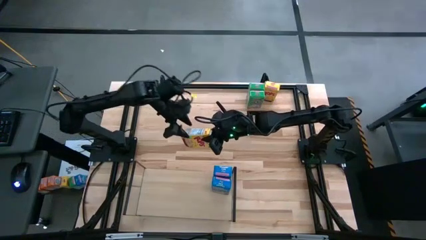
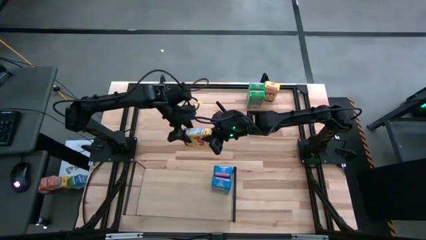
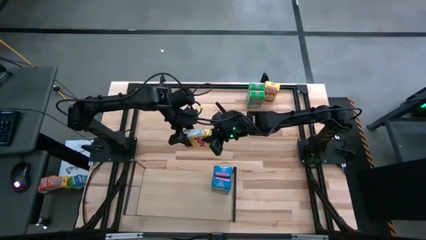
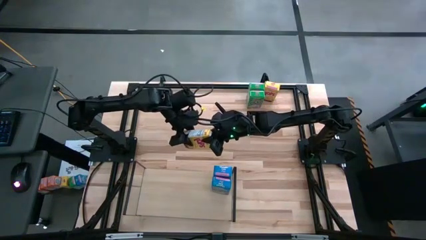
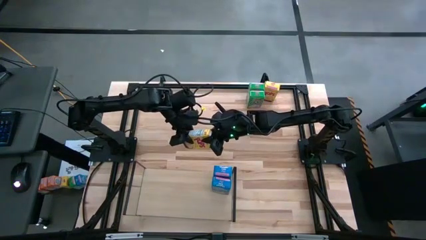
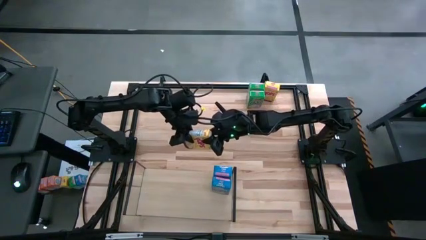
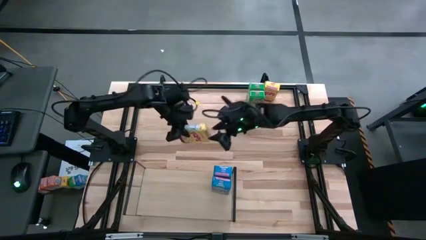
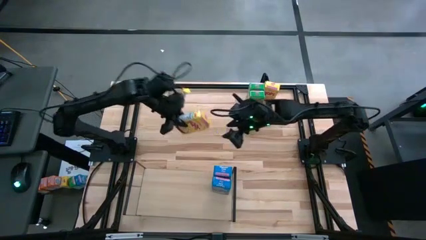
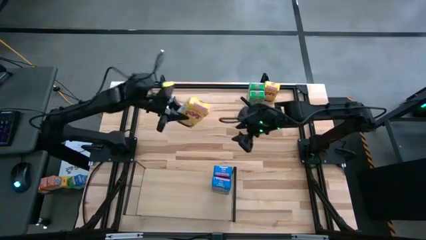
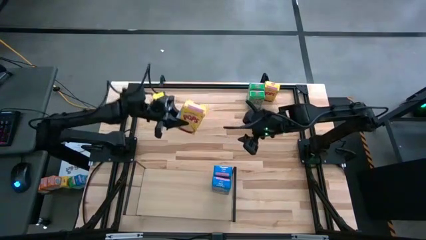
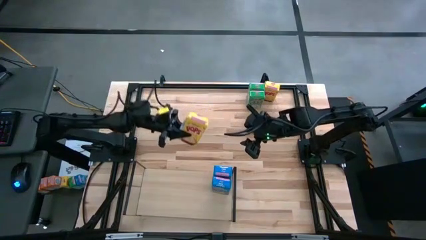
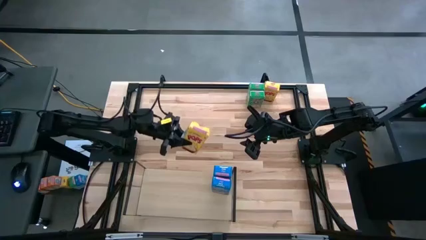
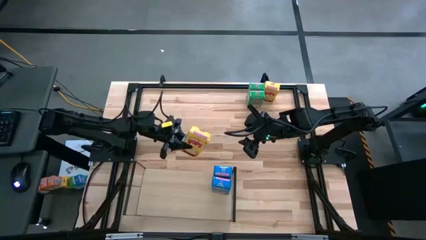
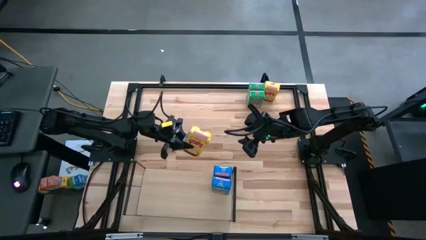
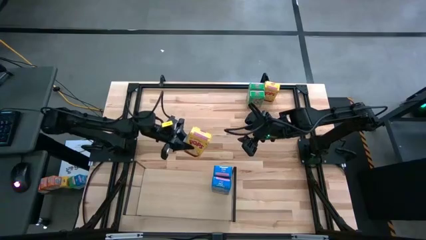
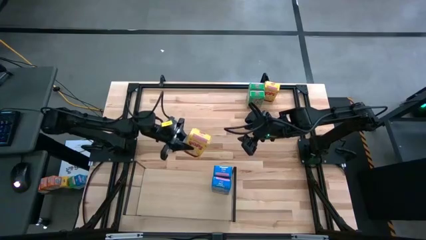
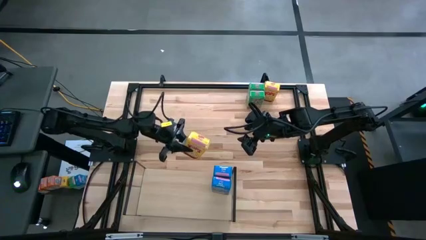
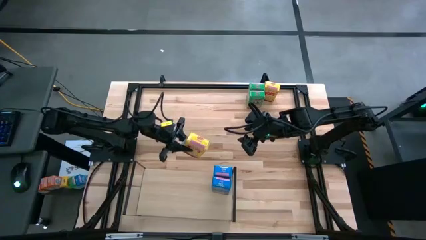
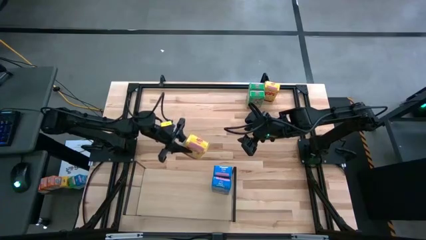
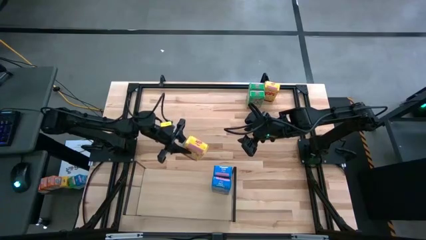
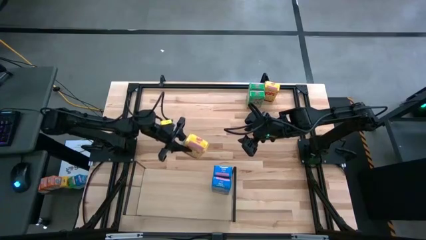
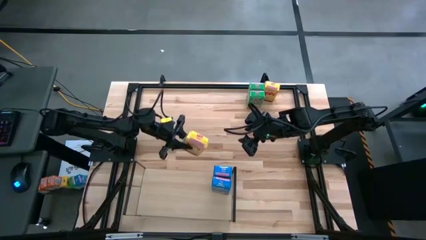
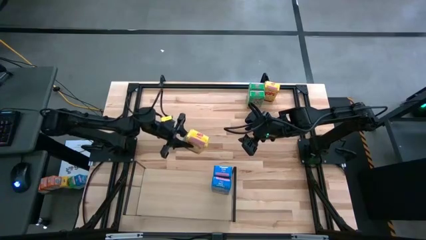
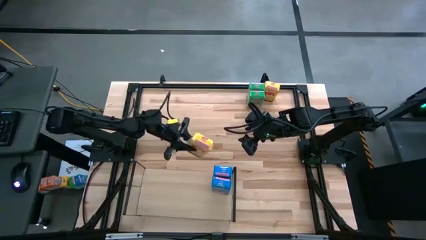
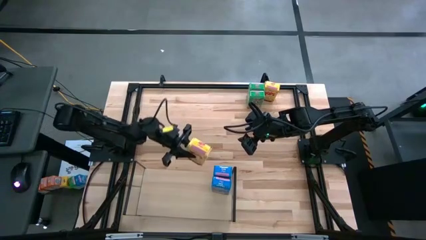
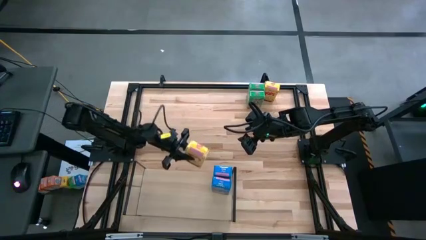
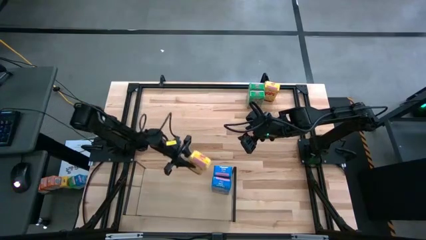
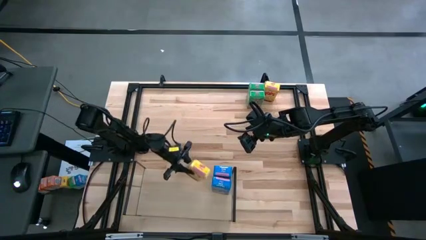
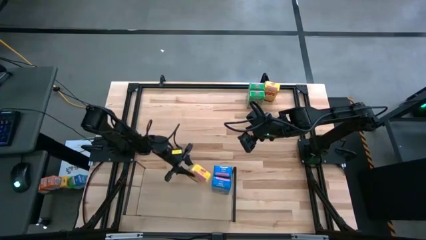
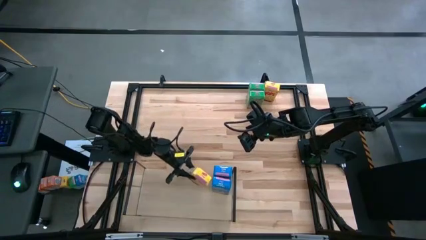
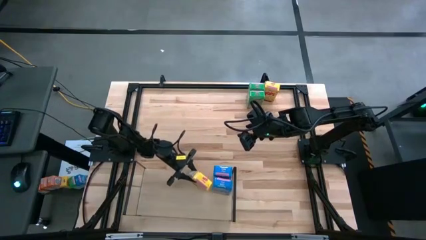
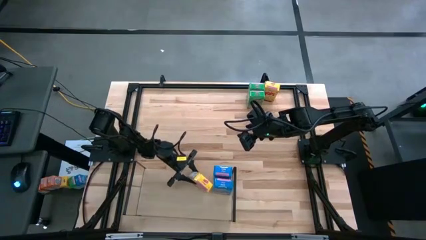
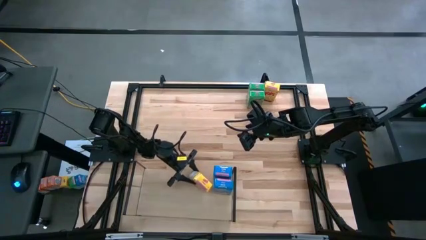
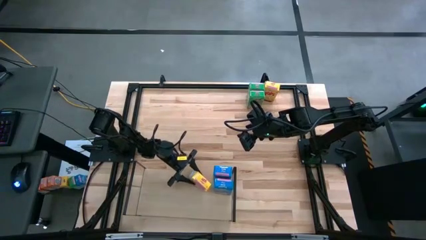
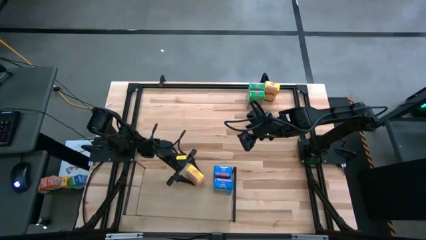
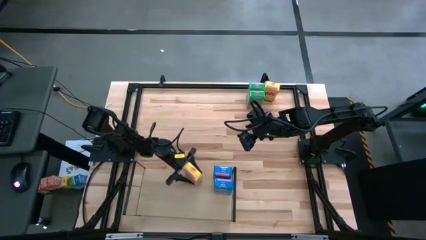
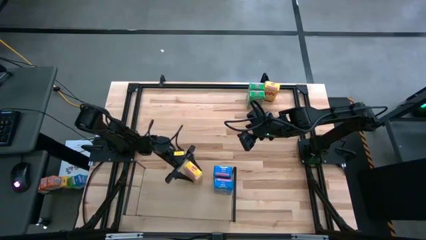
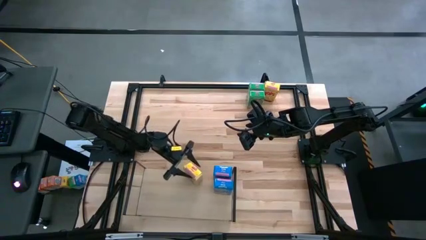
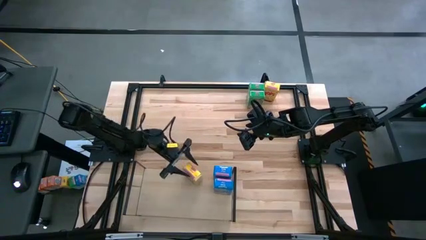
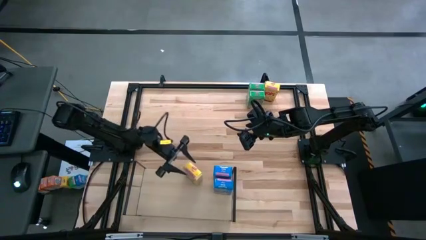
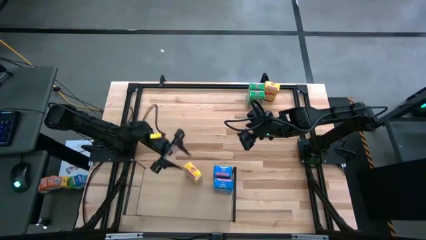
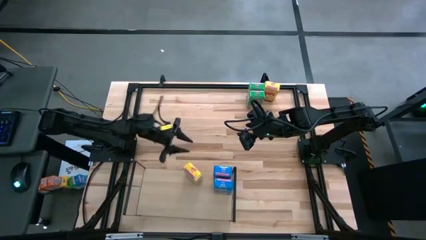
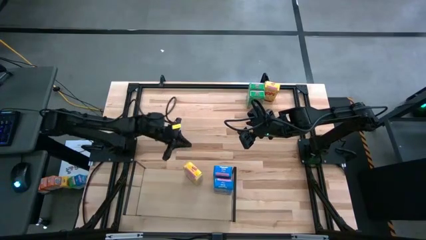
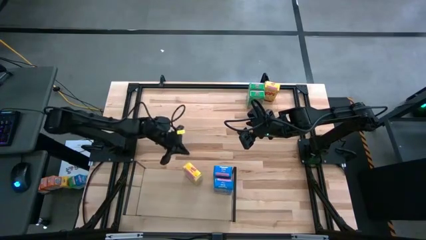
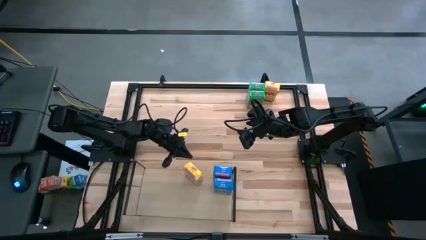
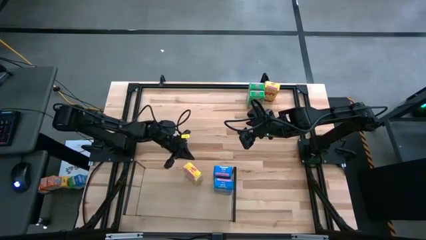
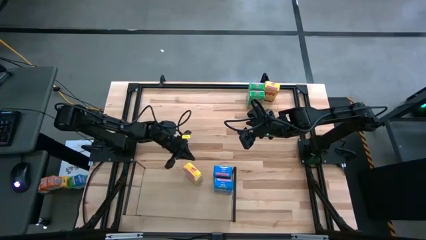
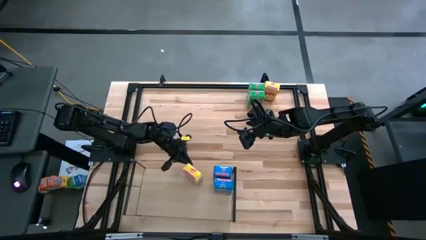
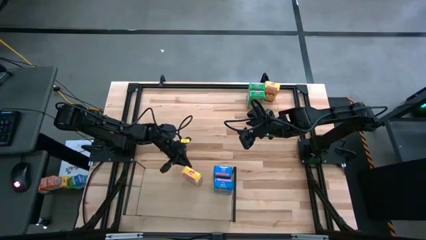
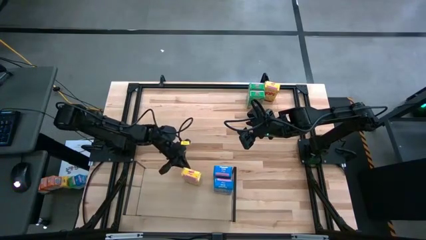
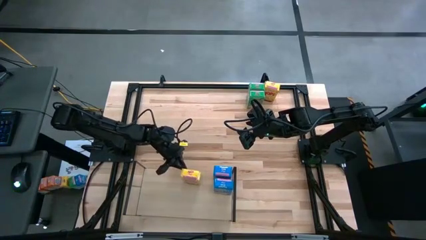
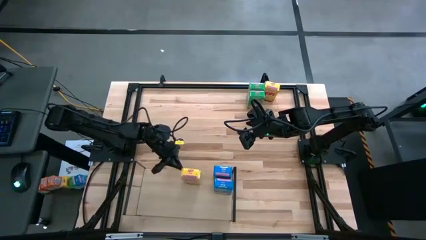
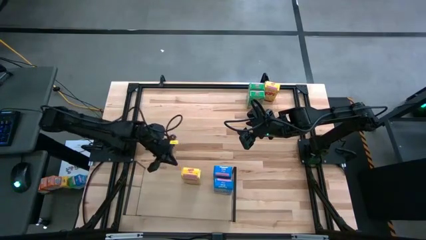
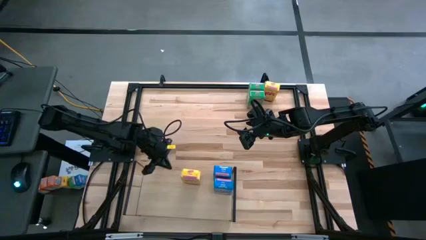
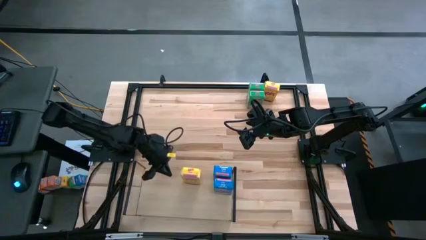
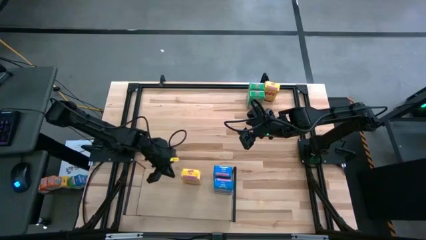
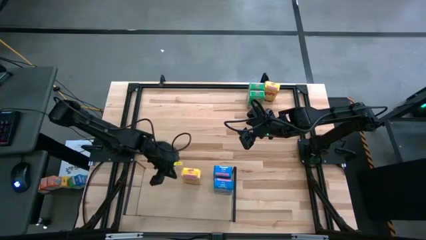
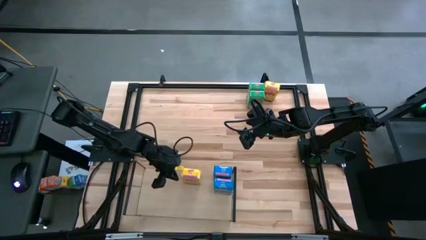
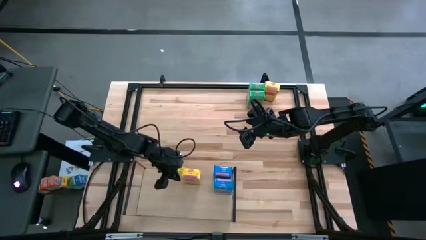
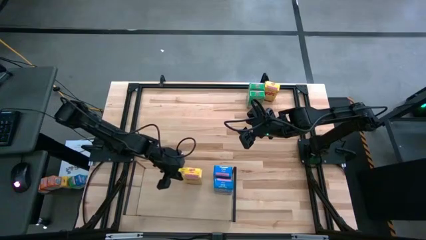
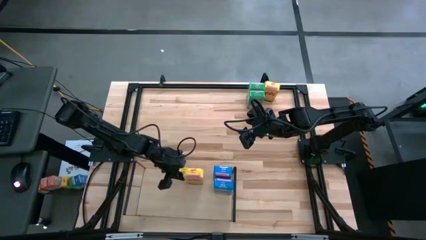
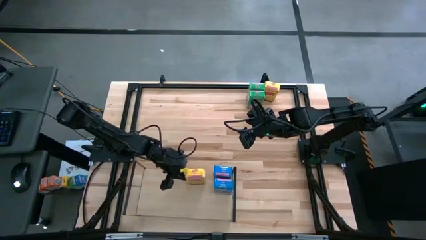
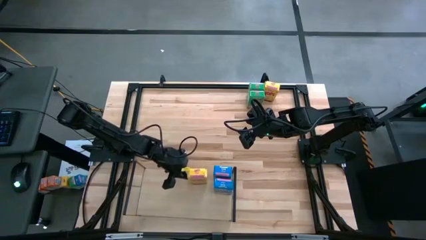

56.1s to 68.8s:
Task: Stack cereal on shelf
Put the bottom yellow cereal box on the shelf

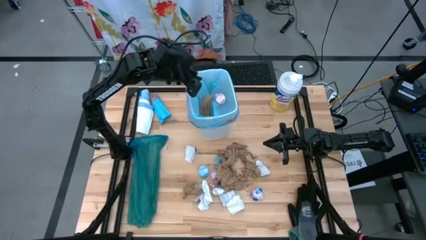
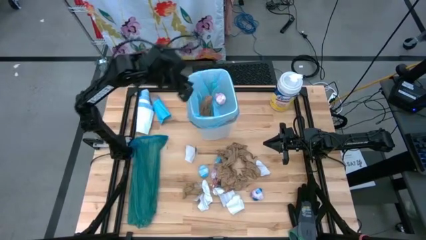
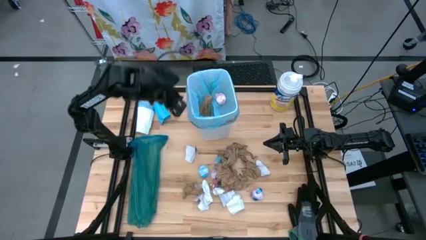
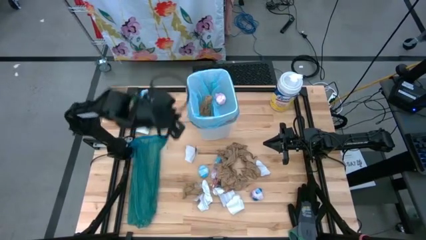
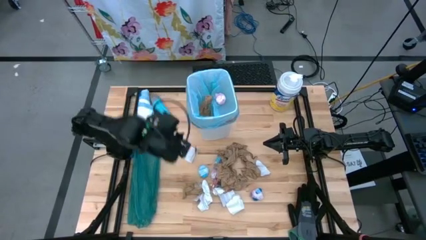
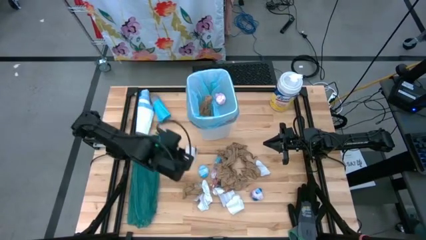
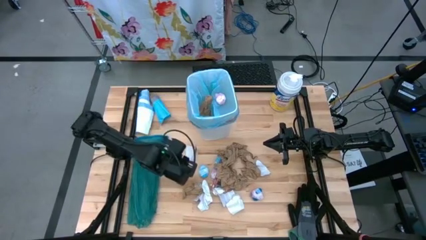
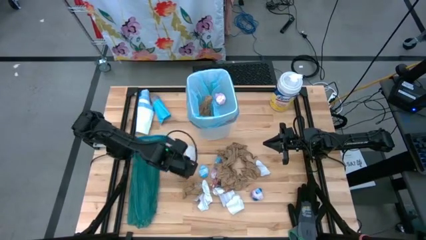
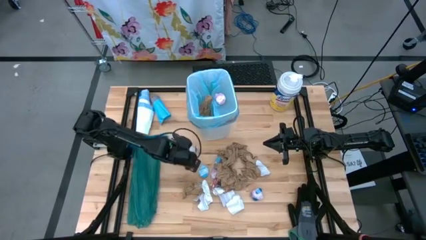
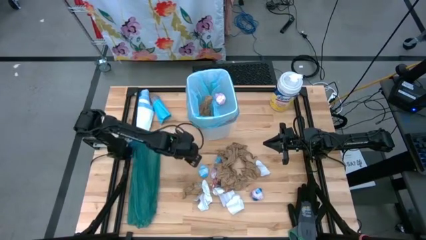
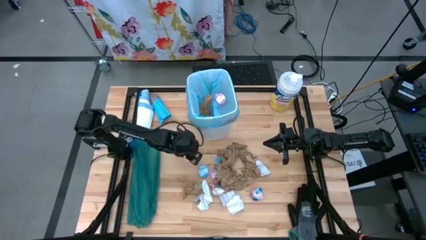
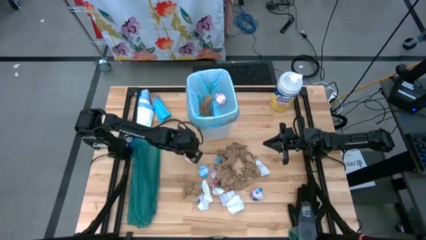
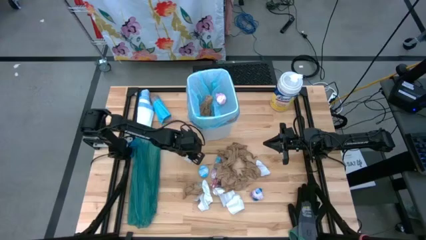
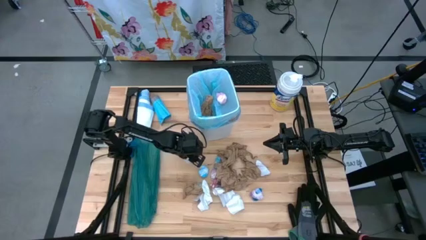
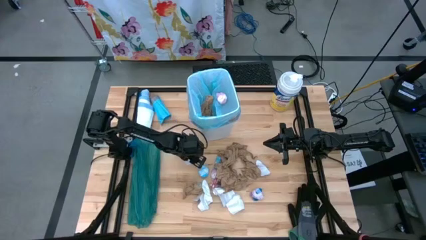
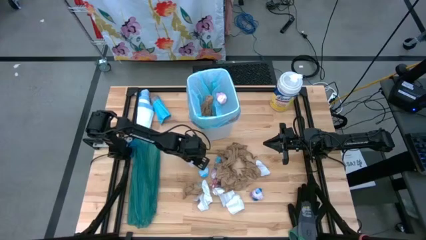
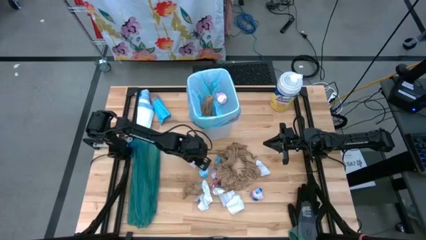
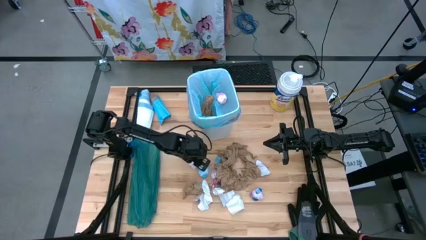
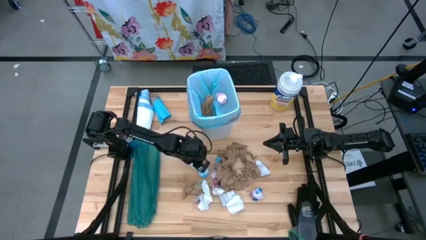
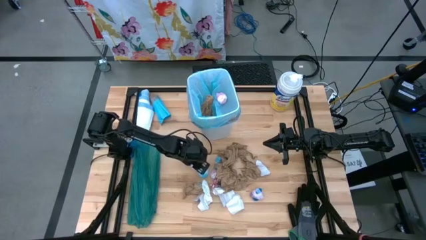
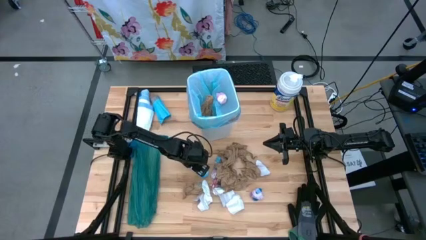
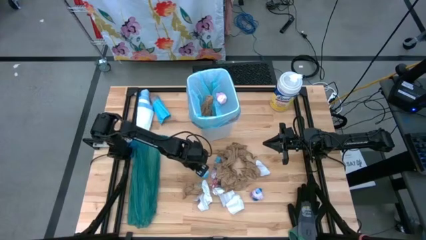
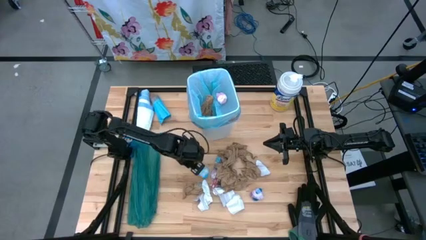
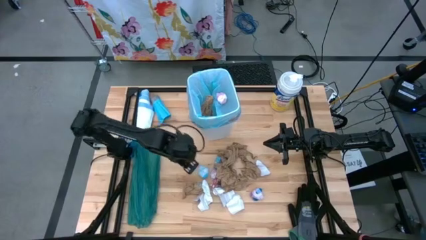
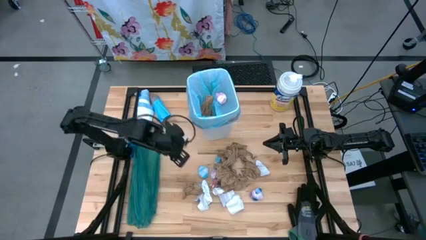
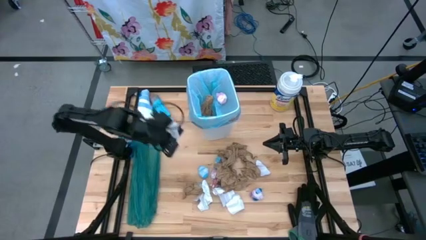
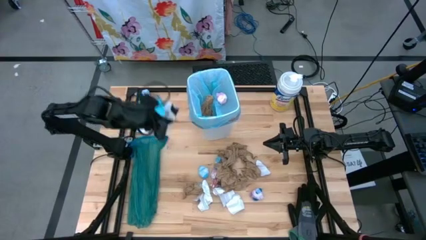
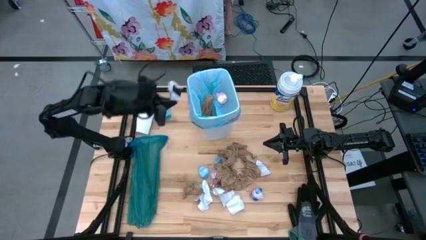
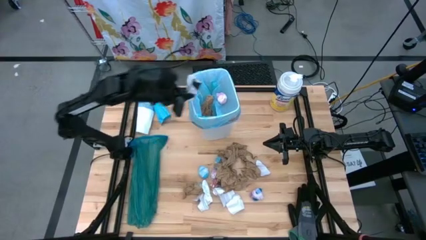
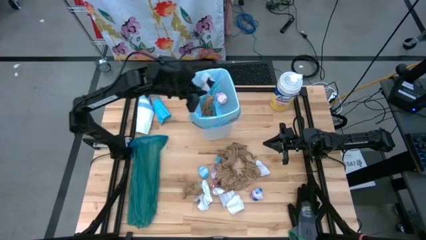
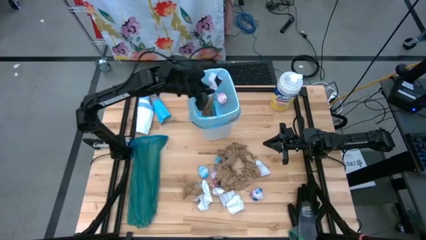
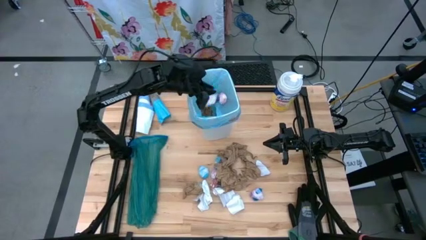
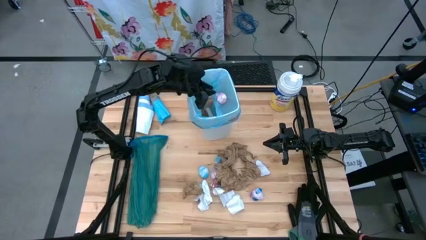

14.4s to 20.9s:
Task: place trash/remove bag and relplace
Put the white paper into the trash bin
